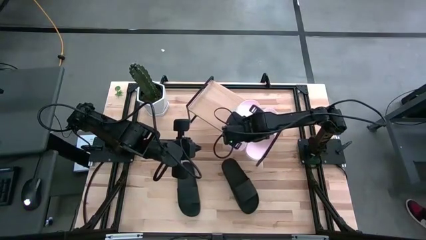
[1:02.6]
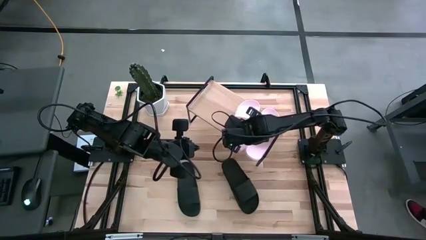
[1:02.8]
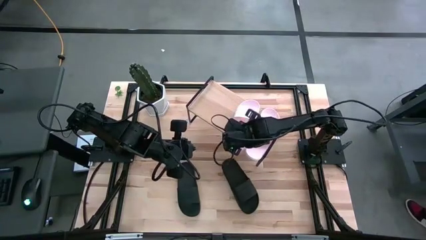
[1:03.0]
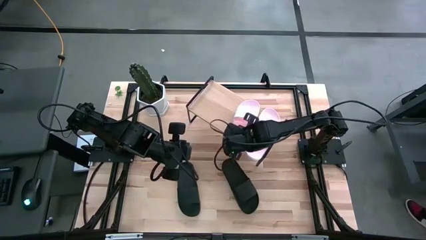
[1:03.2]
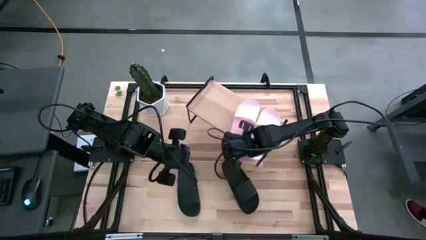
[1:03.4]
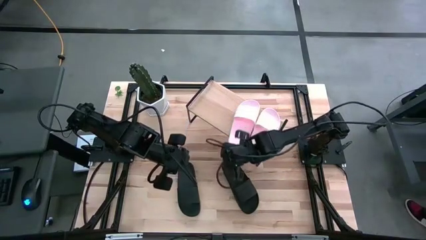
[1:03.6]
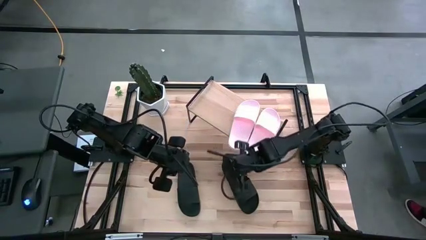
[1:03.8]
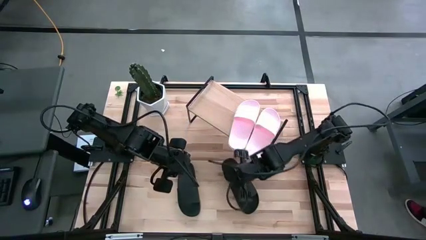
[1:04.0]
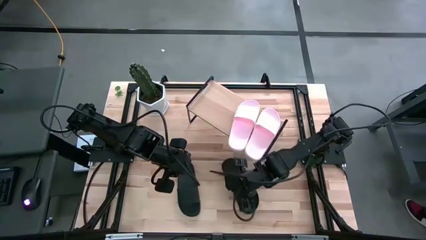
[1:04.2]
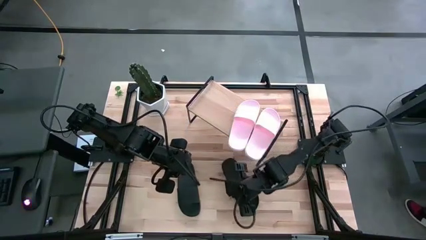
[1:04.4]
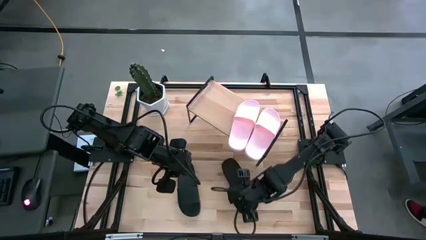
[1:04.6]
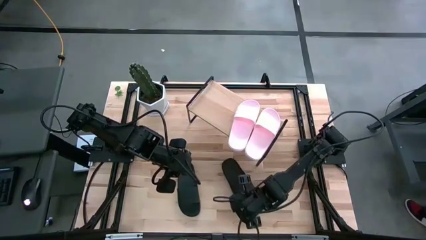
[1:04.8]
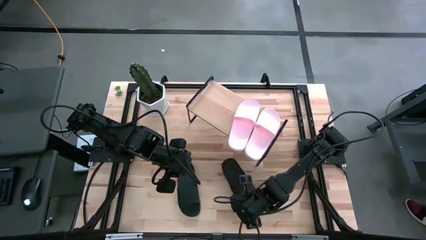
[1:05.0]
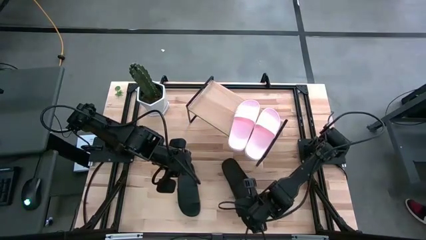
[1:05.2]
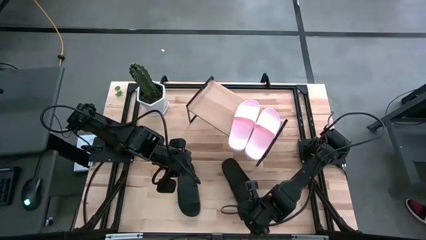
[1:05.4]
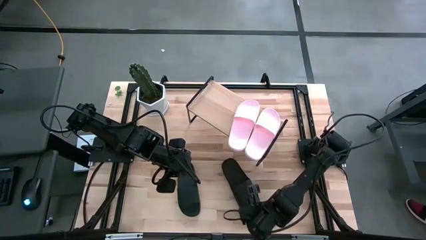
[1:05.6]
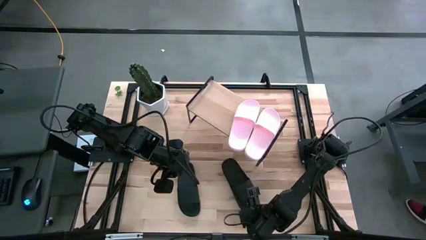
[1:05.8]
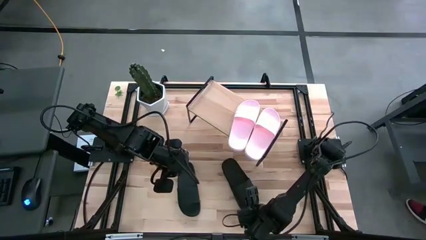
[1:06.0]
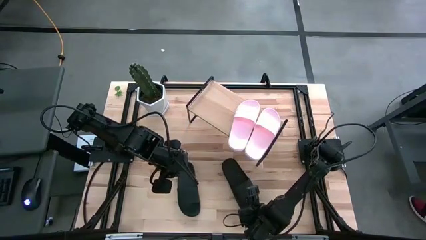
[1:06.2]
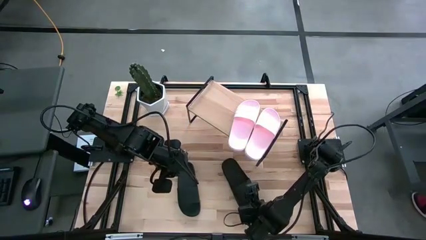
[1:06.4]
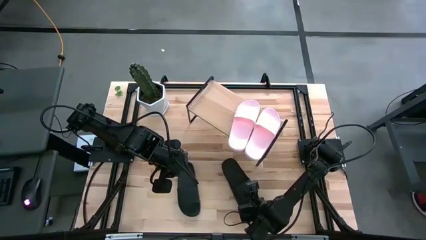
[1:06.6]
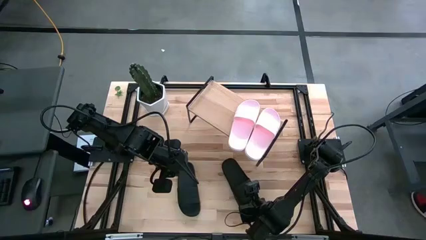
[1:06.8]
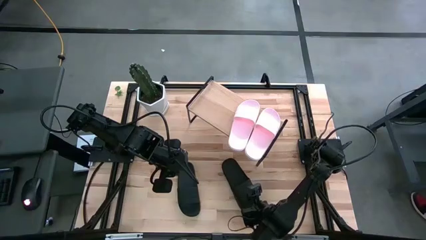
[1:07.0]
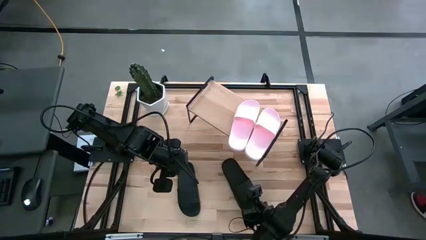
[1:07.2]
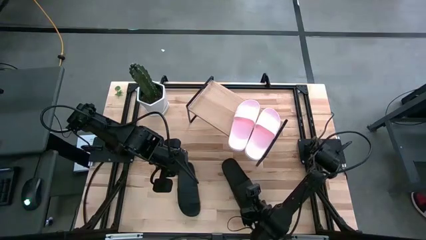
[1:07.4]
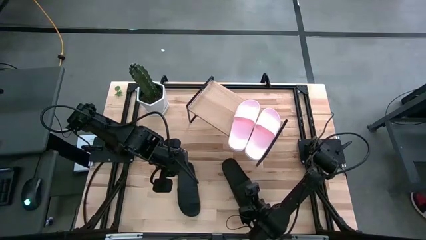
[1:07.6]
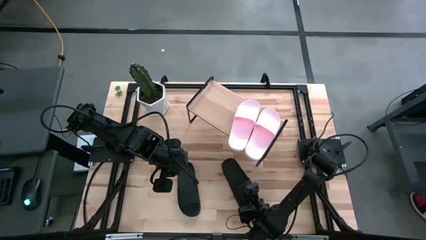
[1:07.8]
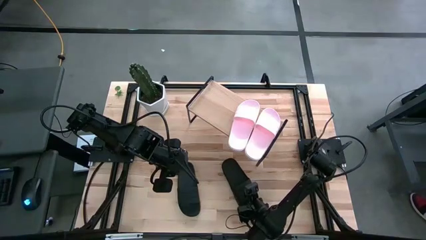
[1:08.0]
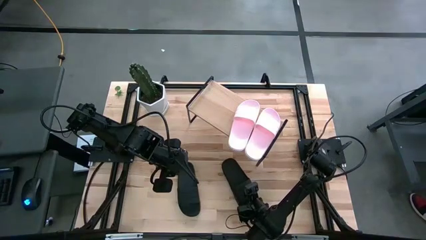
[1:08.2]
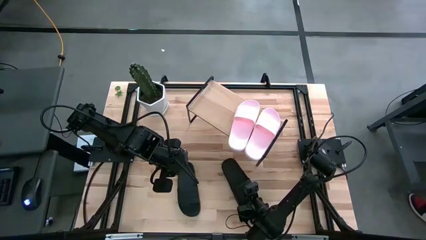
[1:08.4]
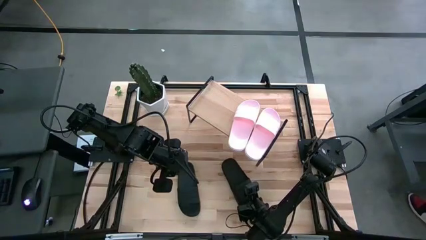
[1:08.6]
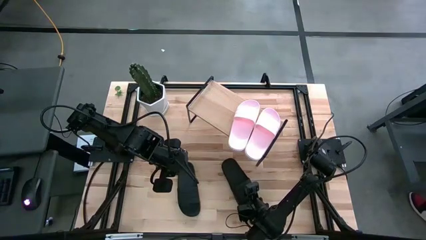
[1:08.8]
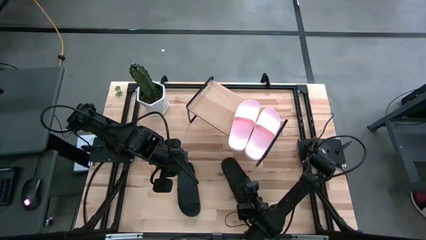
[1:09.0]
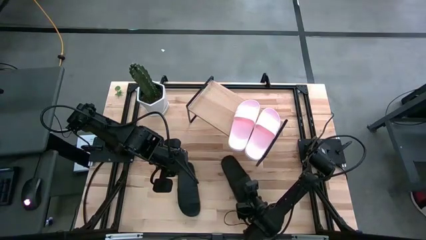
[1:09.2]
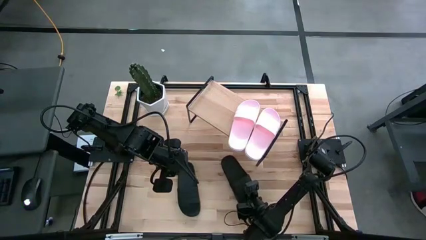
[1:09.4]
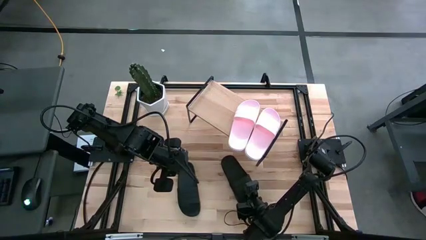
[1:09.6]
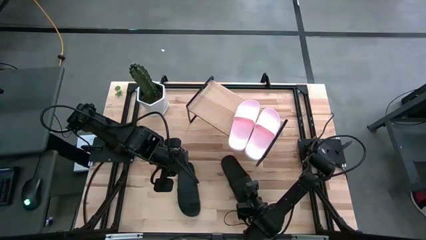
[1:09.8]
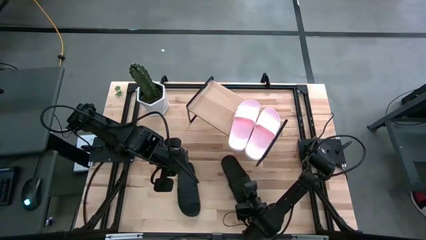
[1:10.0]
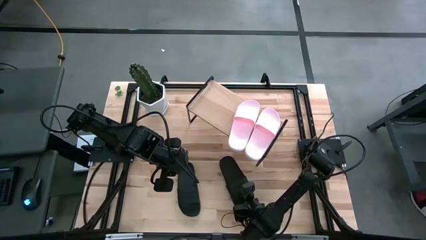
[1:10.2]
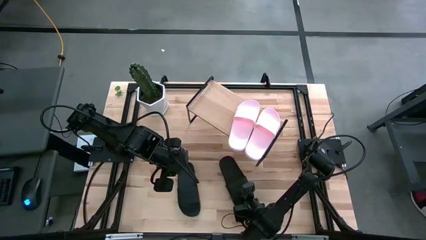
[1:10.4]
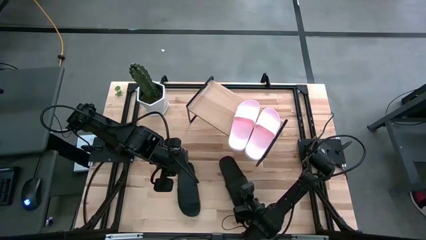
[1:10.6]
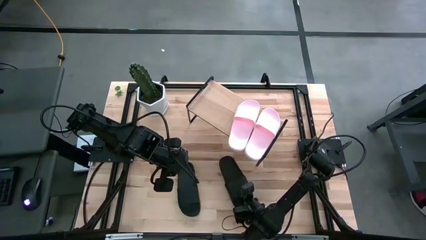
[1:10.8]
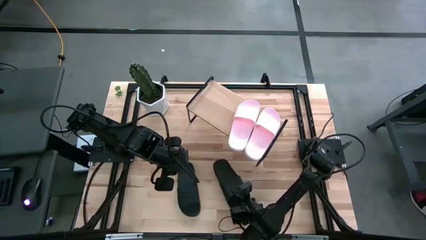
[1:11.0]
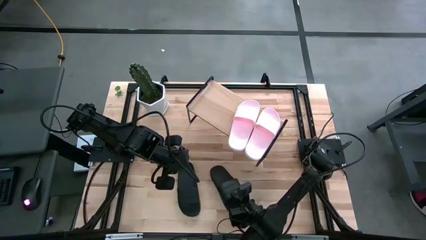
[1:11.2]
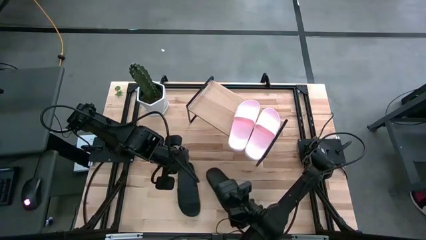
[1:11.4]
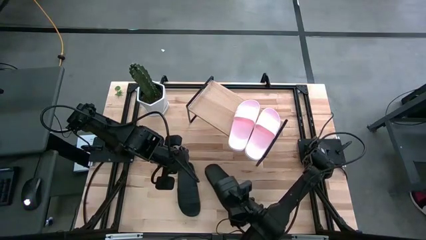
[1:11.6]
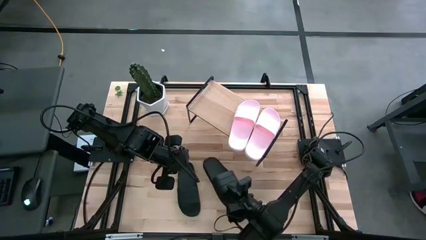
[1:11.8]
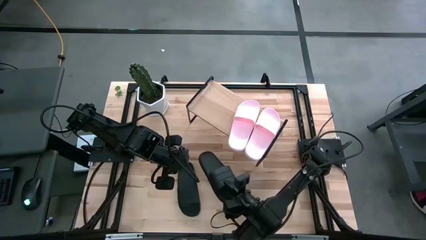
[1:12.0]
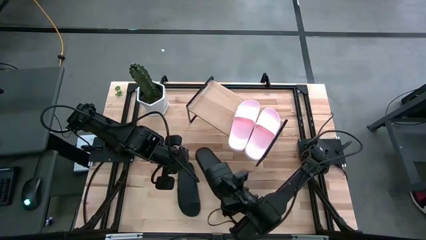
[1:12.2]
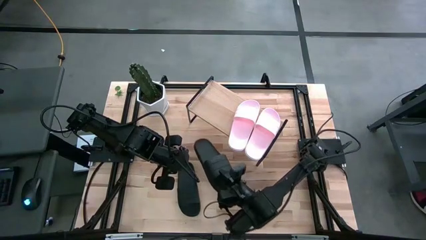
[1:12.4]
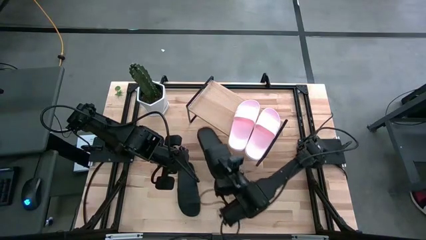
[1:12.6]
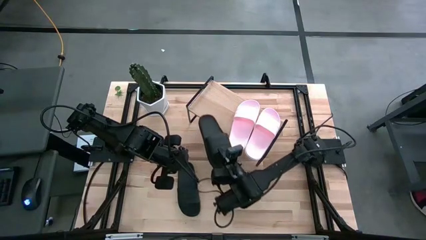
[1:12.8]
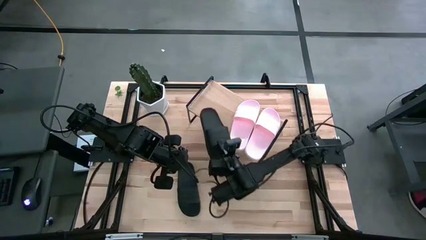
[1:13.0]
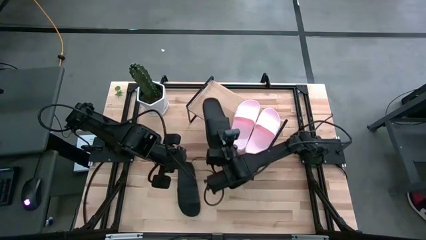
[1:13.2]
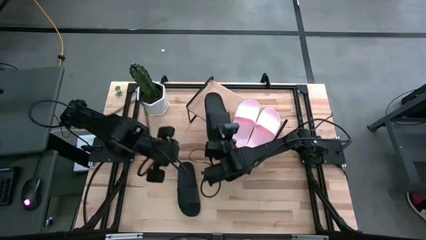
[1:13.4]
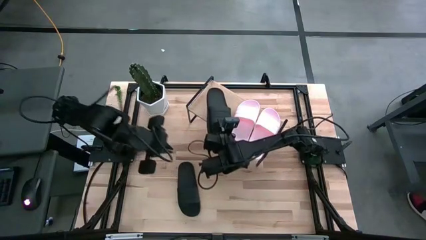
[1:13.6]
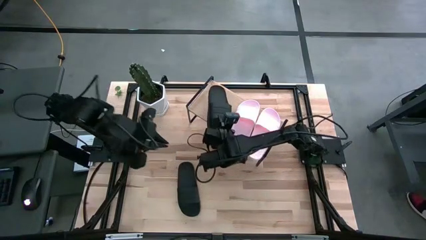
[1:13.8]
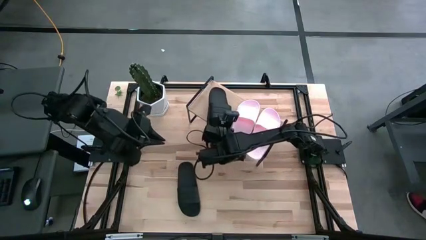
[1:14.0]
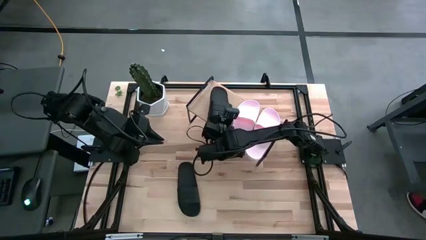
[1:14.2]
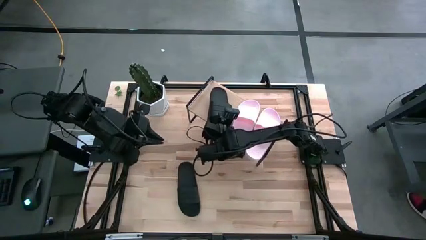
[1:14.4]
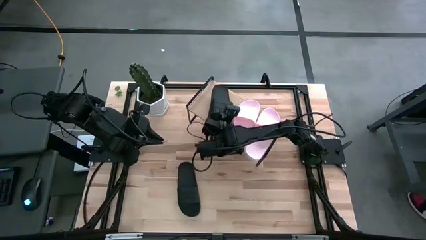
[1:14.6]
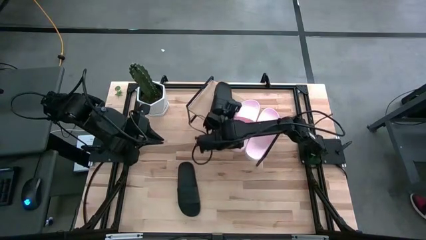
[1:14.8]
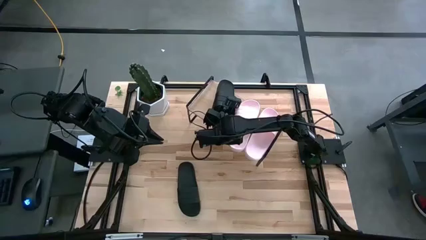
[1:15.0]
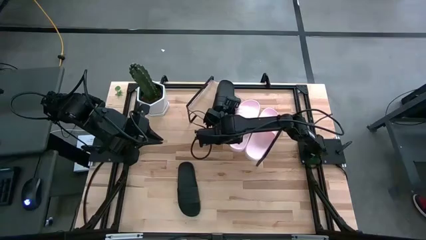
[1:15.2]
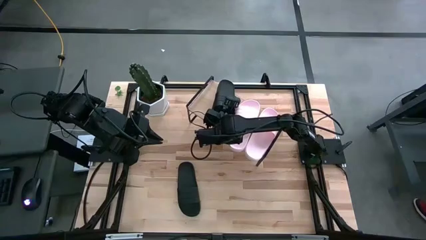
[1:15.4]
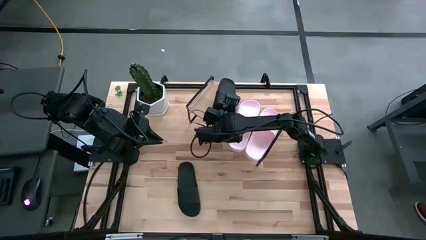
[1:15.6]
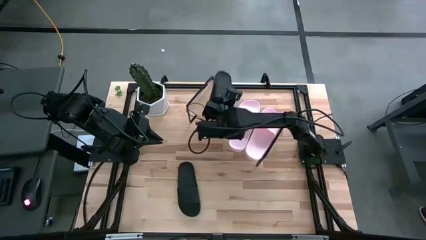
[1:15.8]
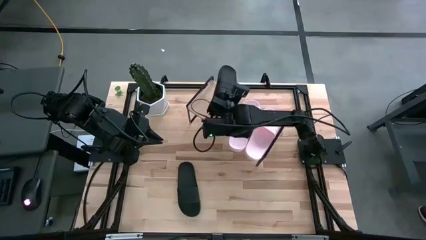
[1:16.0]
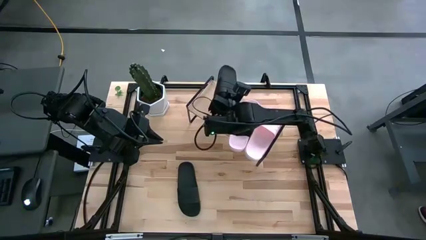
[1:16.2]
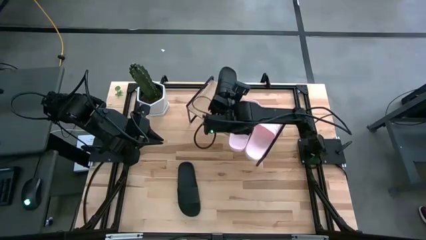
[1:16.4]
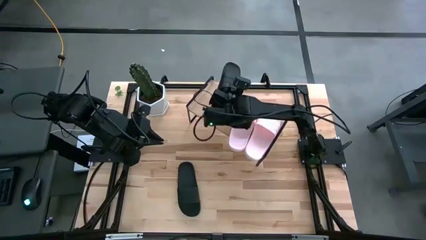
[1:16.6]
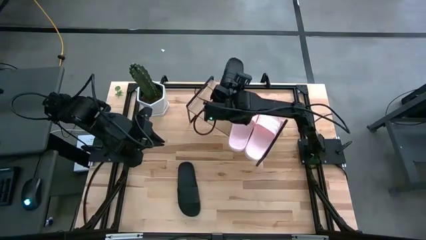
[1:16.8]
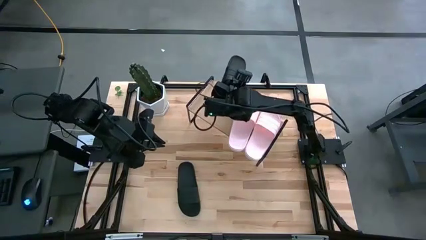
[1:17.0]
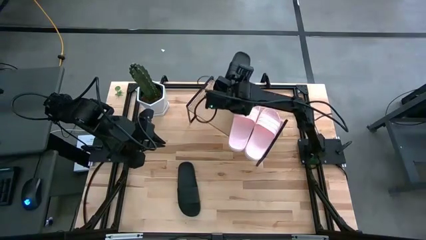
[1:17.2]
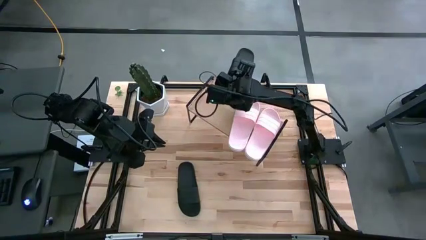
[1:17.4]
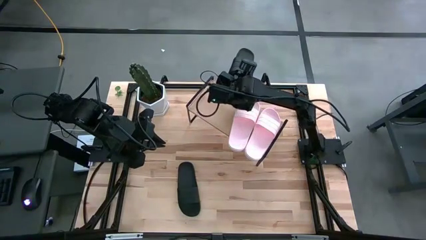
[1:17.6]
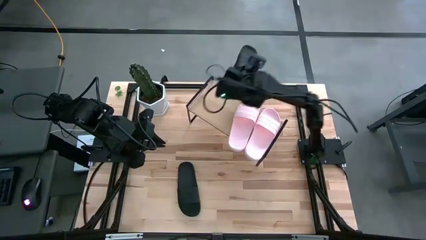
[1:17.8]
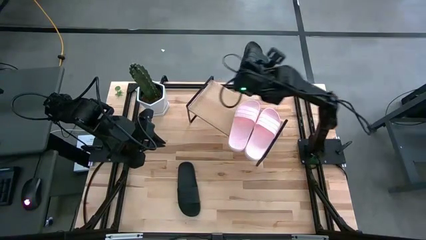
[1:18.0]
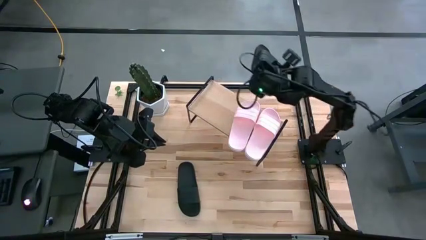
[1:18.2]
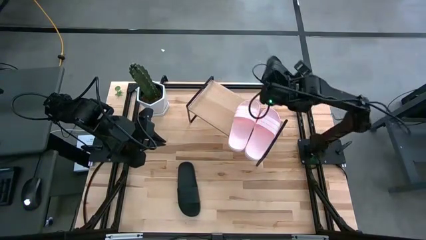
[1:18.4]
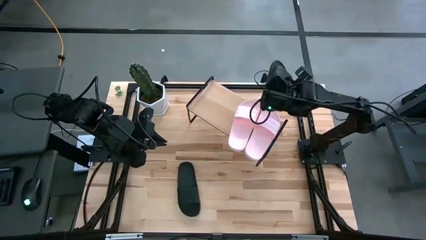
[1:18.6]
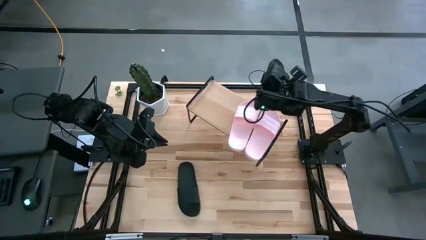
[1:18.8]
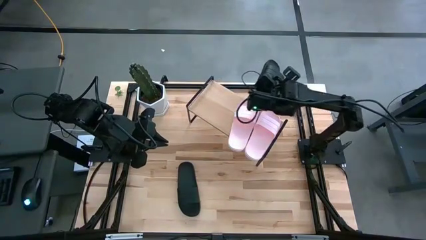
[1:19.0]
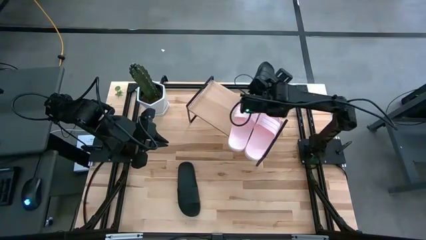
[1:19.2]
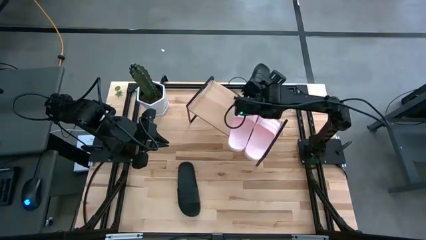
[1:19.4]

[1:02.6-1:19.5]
Task: Pick and place slides into the shelf
Put the right black slipper on the shelf
